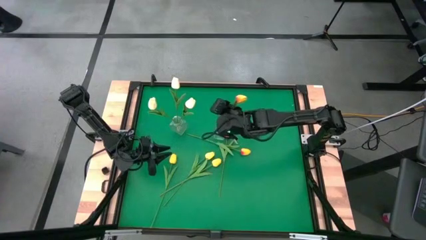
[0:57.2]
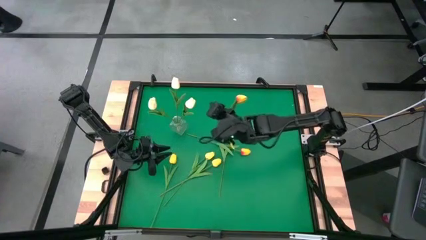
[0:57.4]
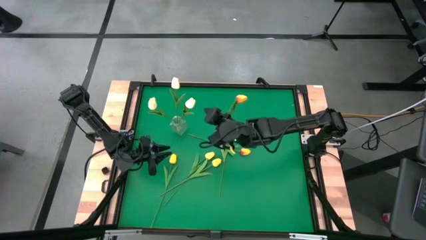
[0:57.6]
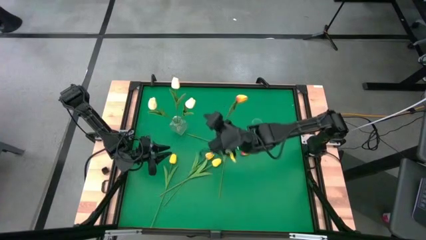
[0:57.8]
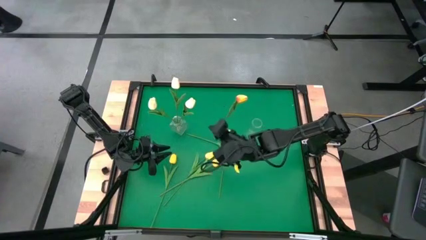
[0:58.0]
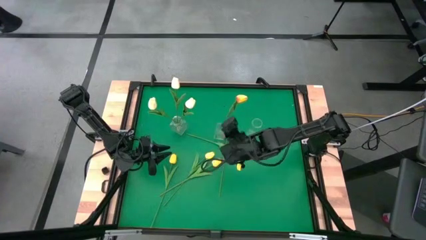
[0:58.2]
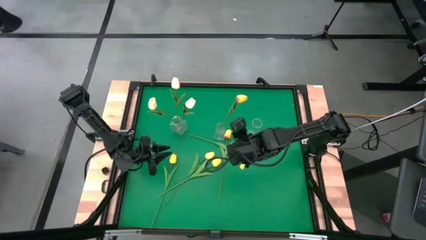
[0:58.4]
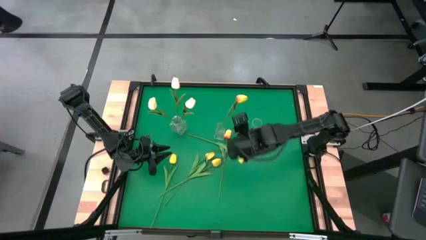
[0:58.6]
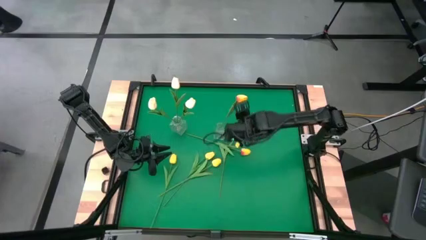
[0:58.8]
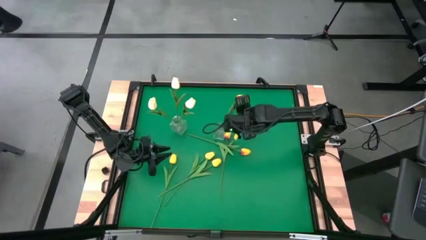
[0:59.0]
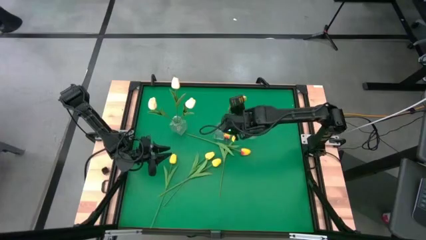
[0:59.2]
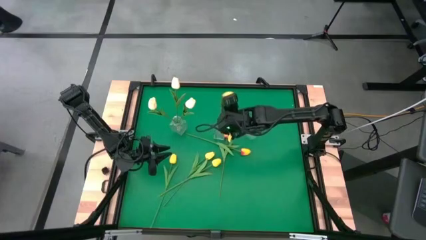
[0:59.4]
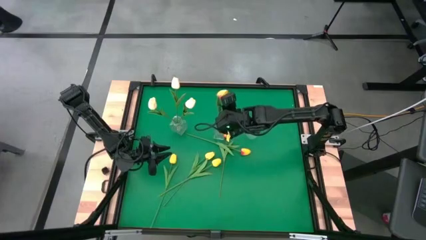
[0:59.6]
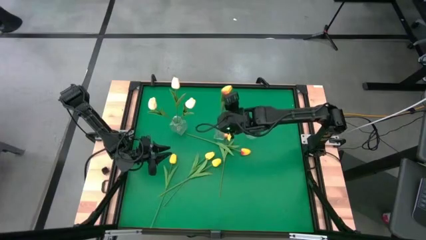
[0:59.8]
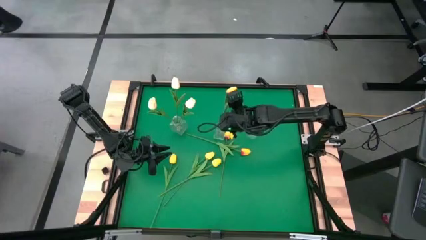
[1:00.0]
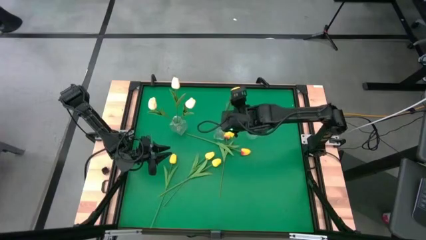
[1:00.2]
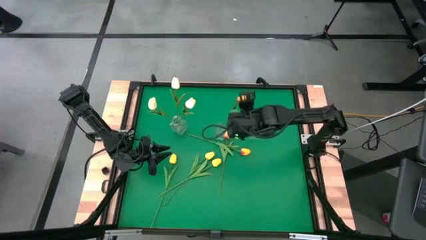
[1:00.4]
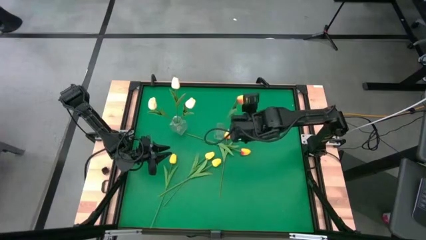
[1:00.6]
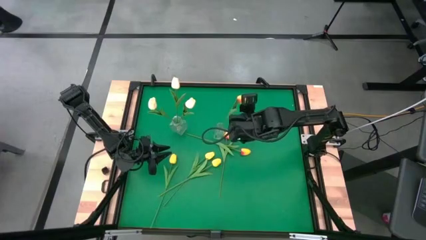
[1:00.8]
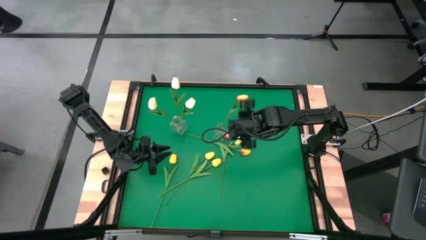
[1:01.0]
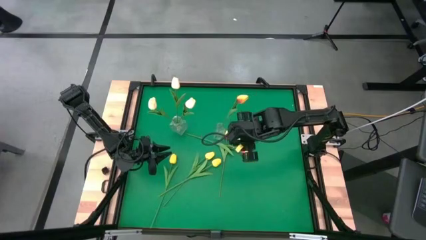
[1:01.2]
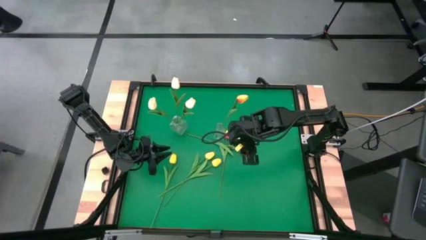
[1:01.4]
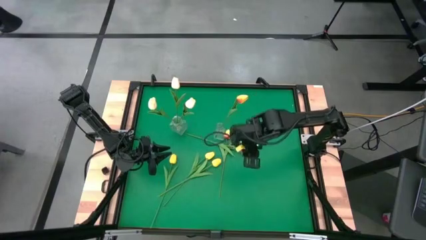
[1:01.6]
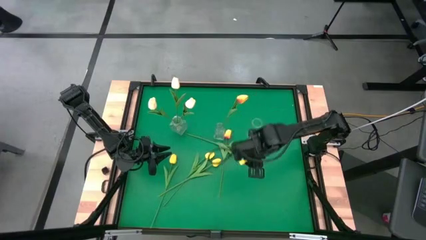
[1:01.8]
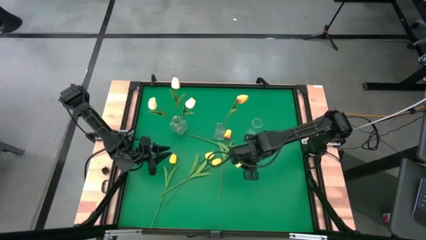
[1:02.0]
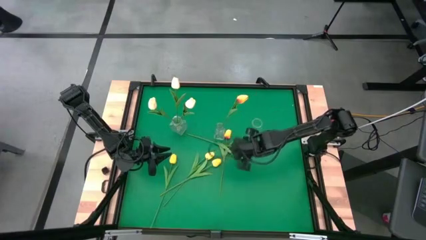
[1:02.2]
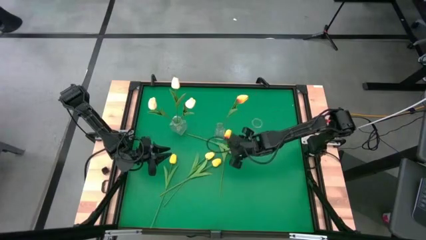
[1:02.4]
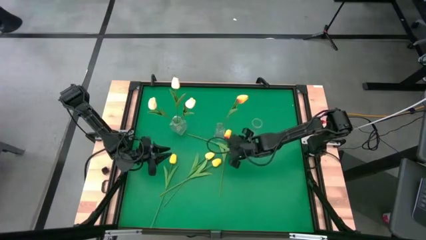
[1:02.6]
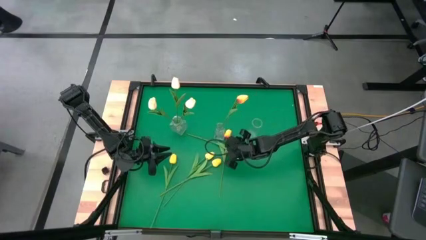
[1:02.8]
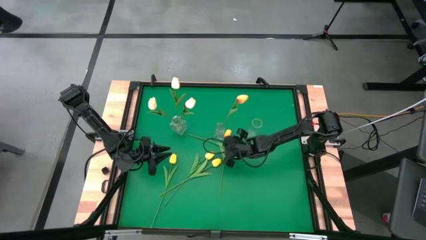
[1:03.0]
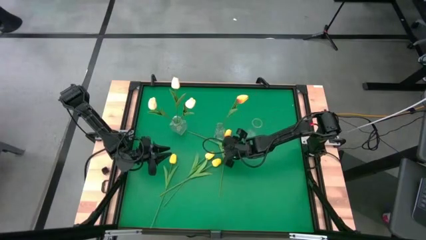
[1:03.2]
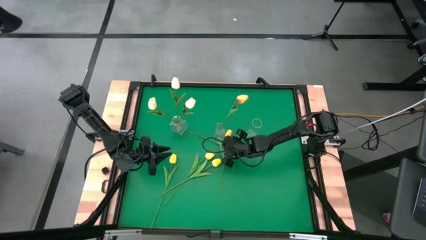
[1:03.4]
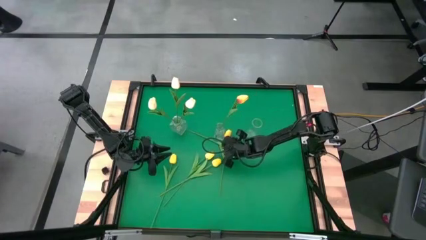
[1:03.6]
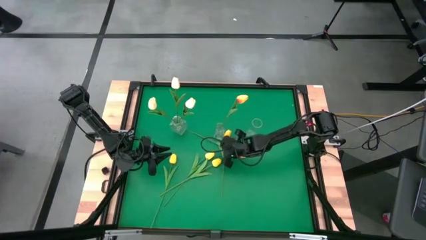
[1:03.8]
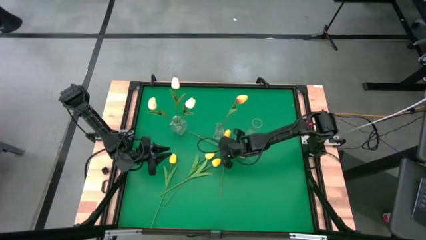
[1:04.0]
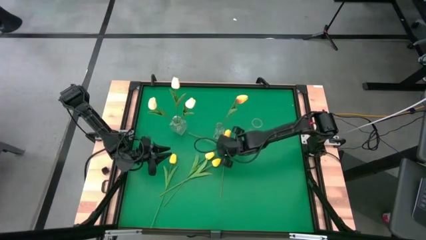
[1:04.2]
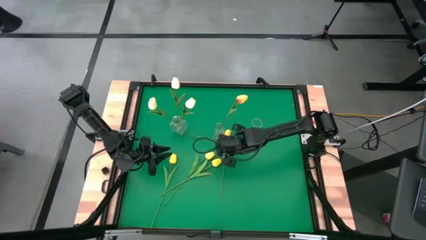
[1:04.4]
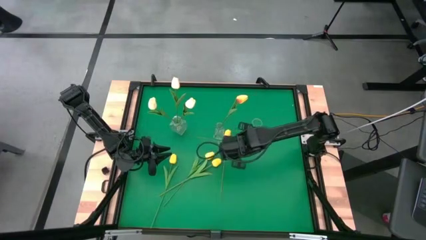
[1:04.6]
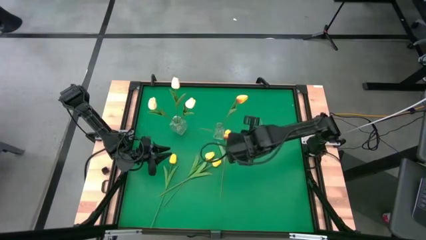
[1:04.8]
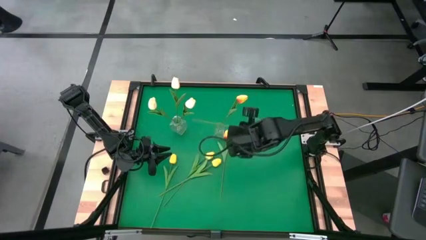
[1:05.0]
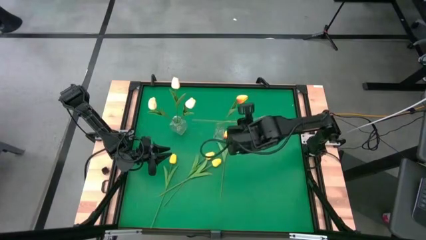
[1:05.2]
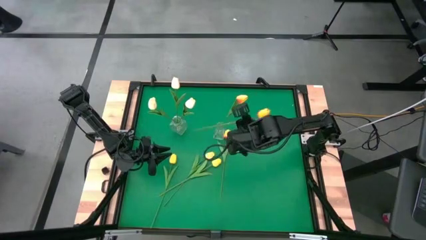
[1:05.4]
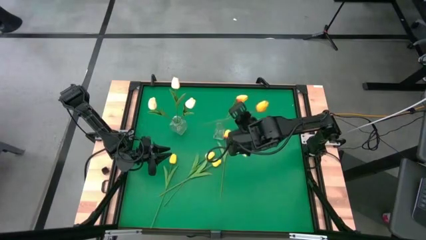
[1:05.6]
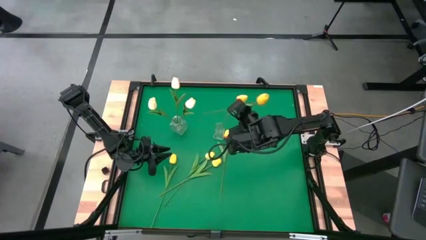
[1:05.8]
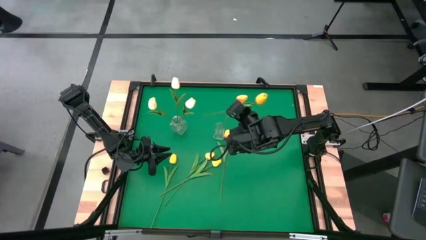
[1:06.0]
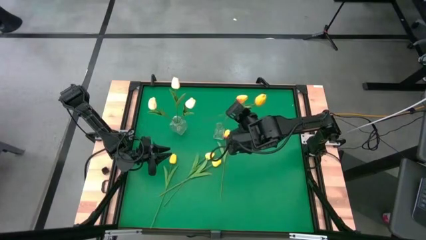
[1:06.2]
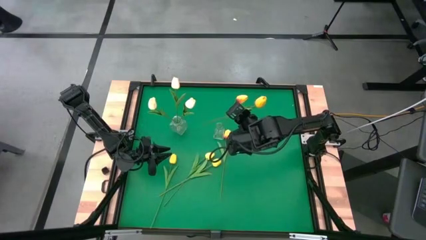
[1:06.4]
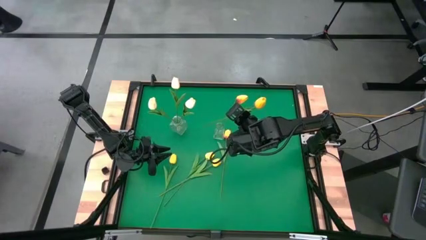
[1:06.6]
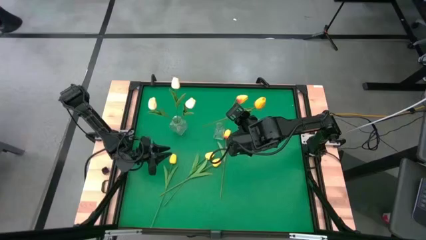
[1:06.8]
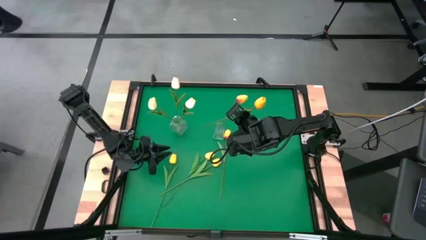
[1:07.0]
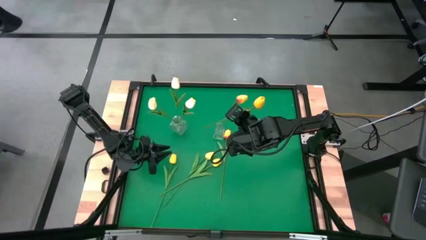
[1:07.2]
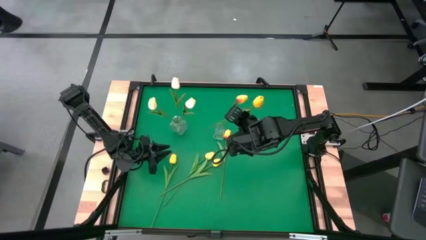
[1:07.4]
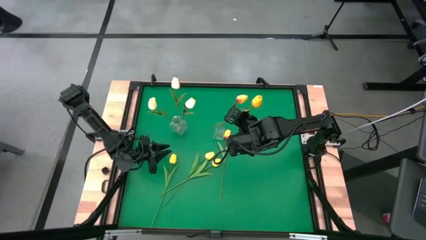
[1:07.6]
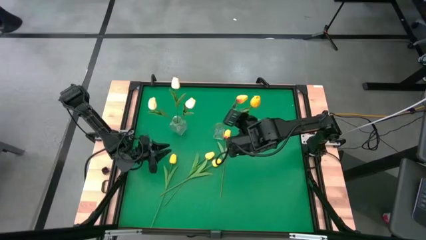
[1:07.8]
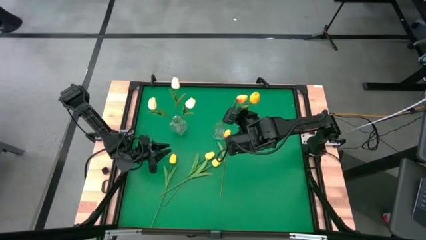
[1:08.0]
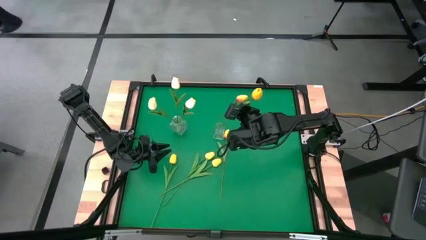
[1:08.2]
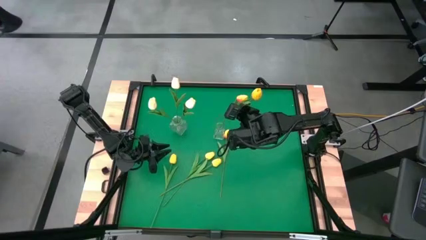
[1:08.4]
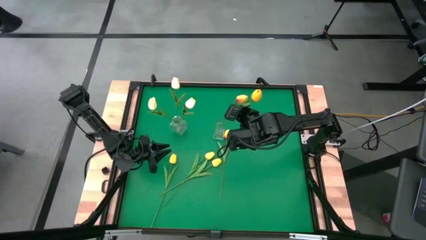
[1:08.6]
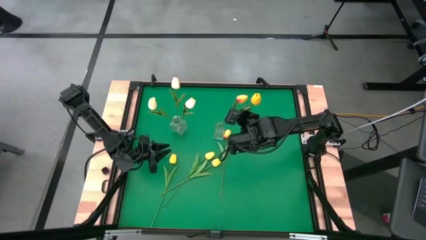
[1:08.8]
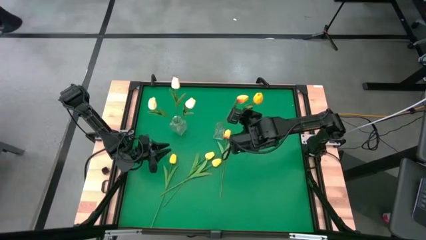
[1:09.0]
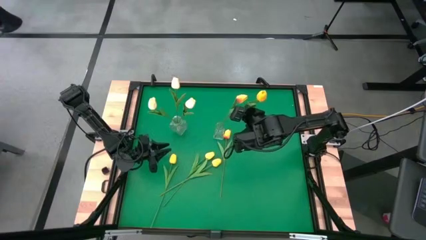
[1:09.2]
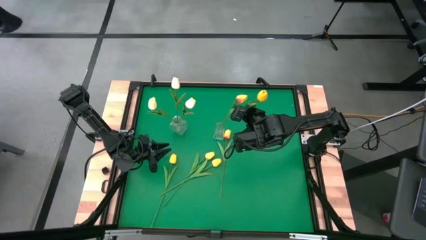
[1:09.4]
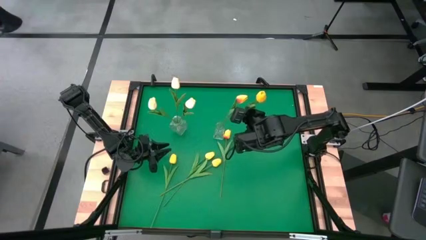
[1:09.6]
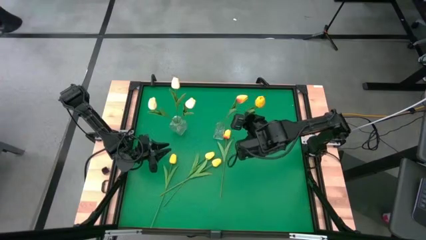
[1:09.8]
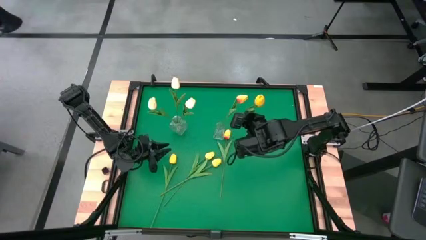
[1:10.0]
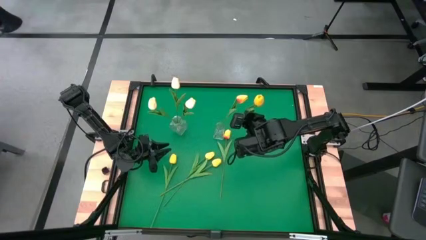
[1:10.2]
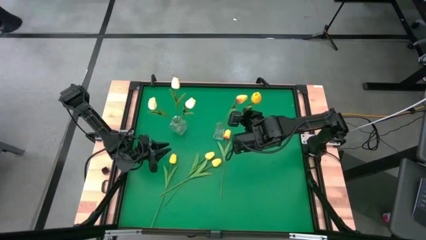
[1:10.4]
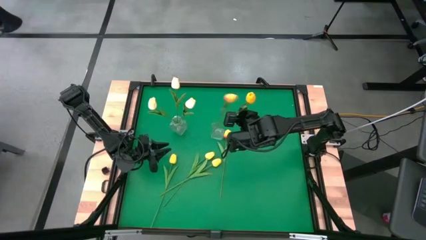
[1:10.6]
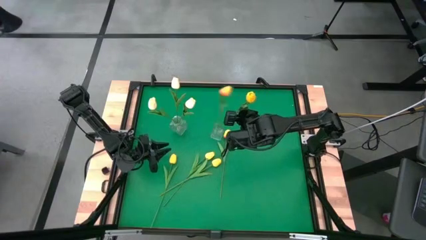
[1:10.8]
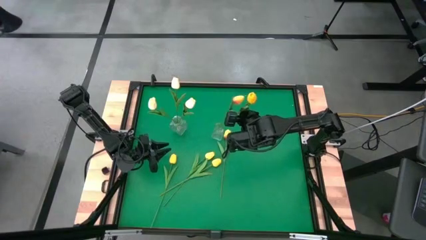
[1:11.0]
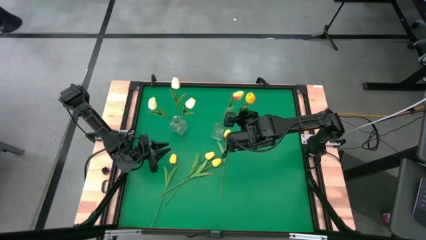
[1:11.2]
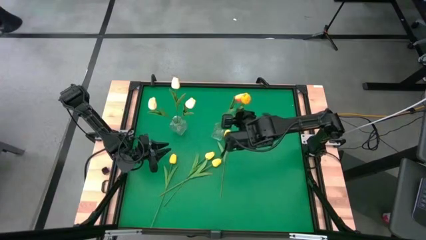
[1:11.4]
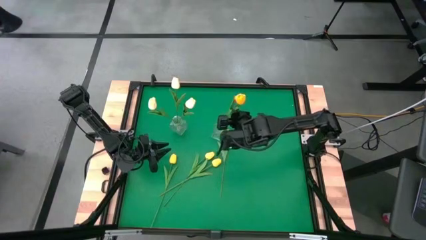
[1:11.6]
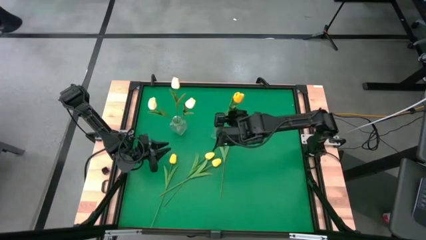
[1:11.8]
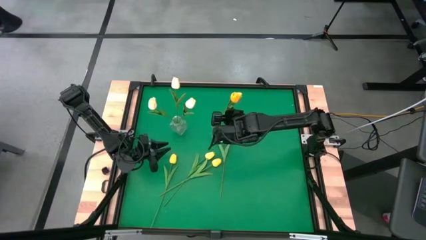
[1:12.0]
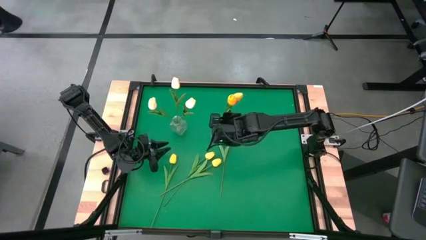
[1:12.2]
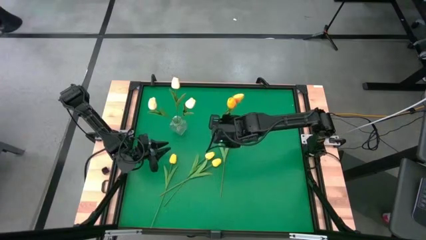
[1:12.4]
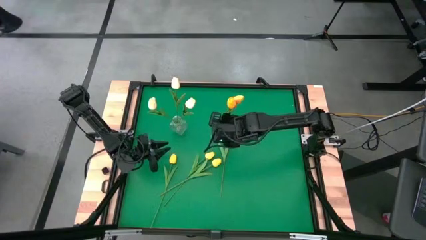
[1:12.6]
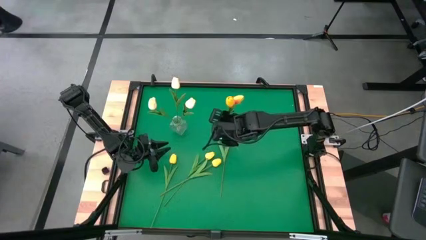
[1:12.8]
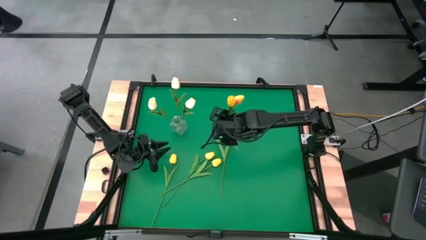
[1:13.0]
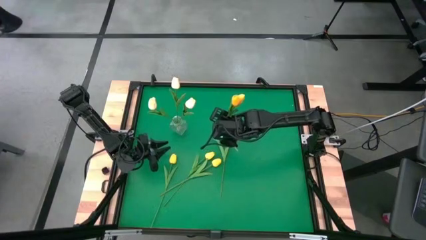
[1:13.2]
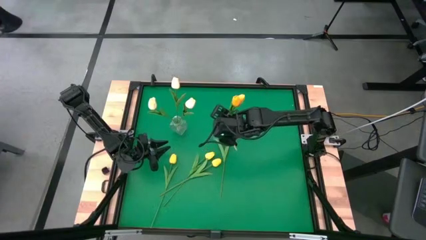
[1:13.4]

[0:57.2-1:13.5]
Task: Sort flowers into vase by color
Put the bottom yellow red flower into the middle transparent vase
